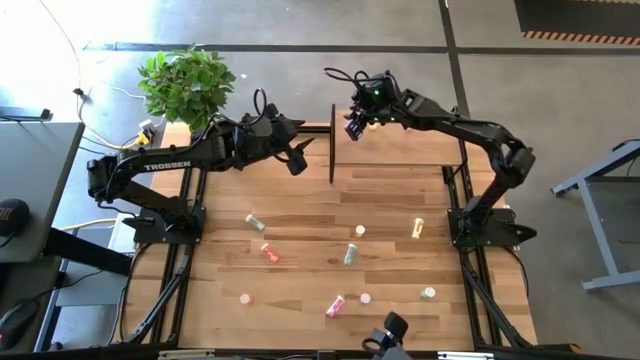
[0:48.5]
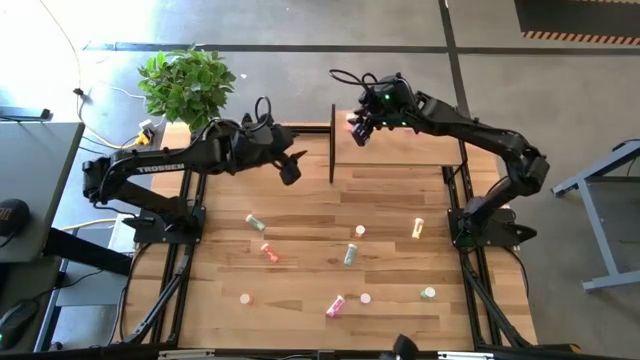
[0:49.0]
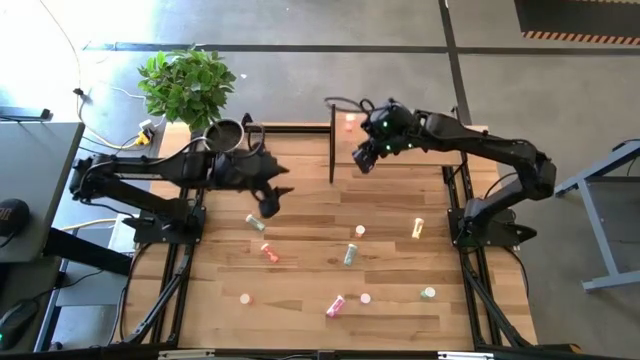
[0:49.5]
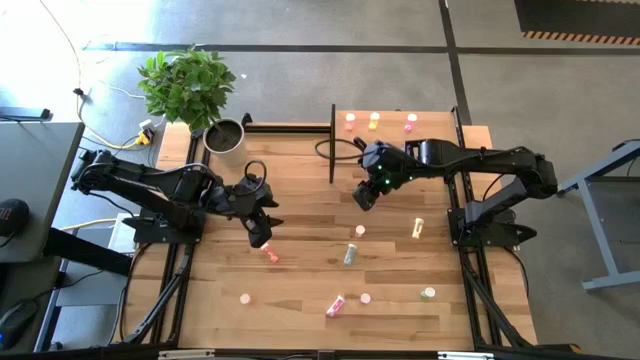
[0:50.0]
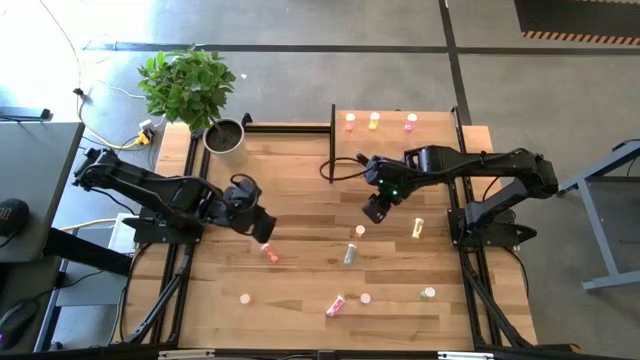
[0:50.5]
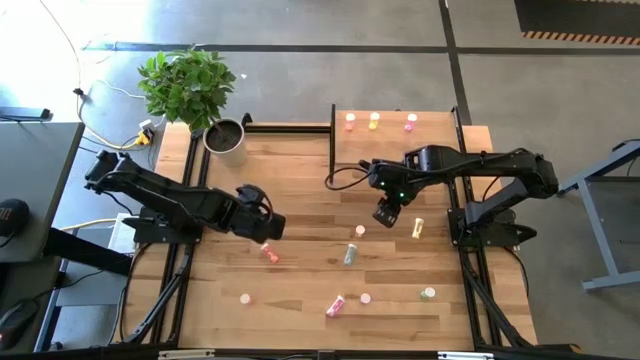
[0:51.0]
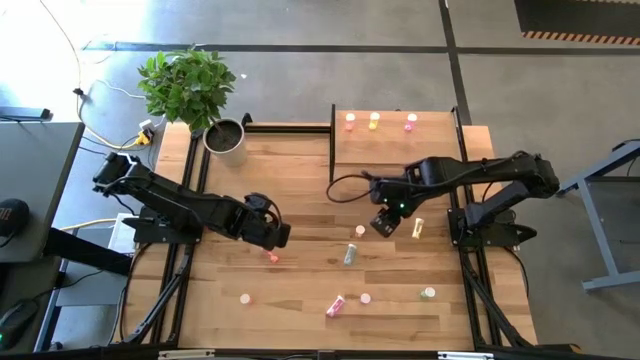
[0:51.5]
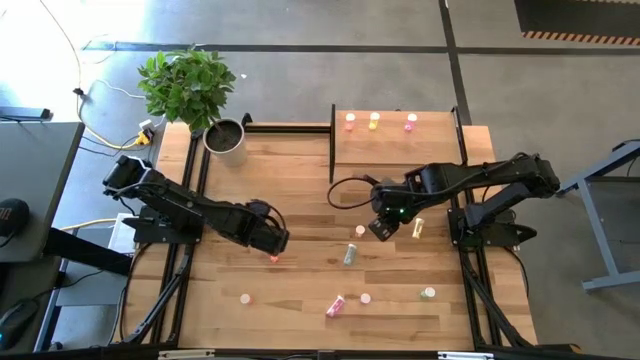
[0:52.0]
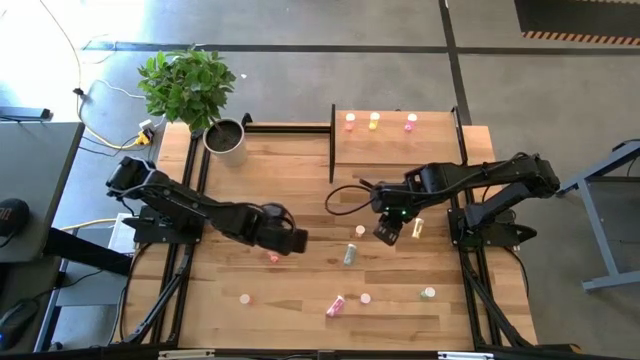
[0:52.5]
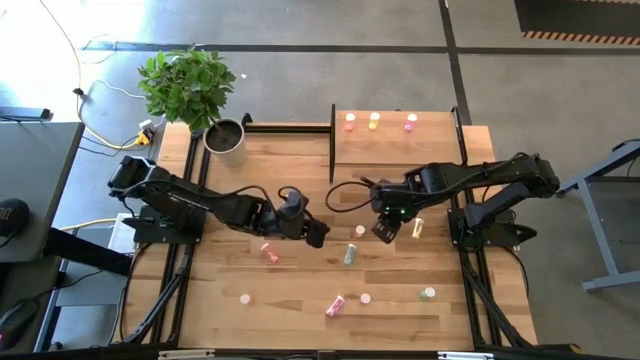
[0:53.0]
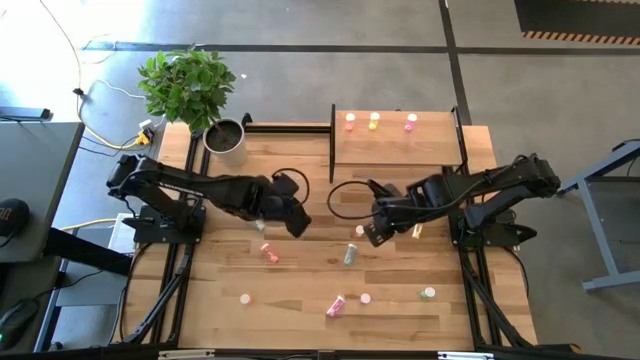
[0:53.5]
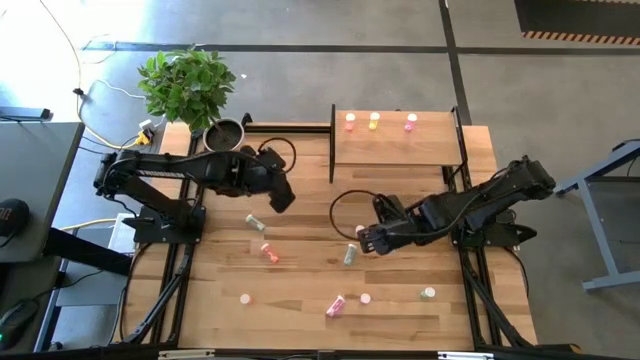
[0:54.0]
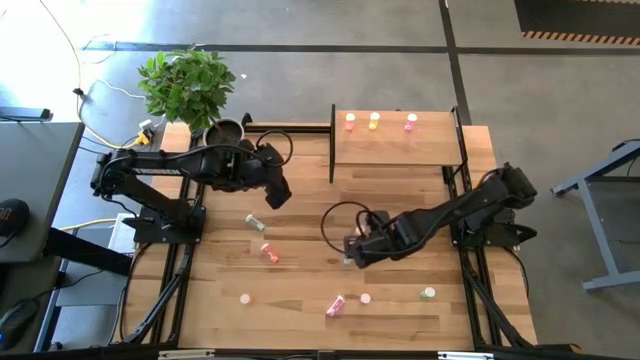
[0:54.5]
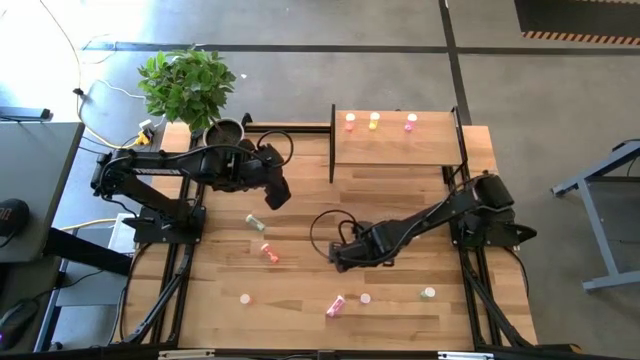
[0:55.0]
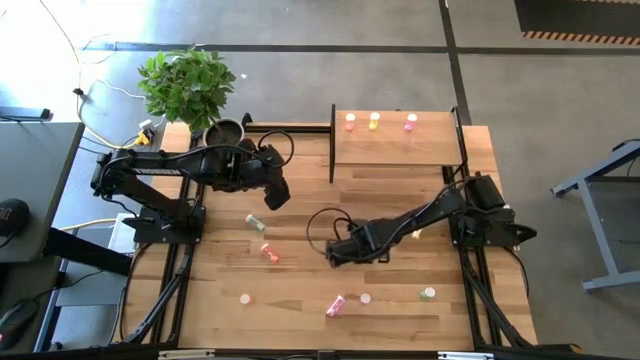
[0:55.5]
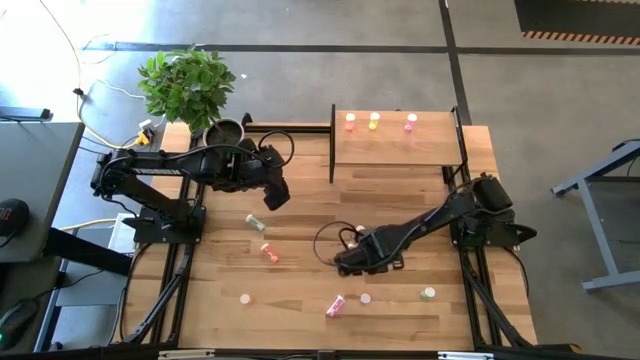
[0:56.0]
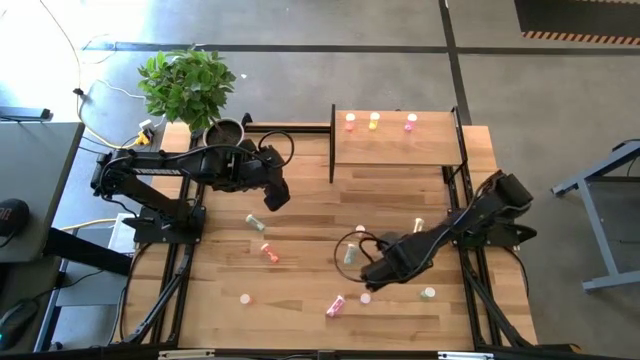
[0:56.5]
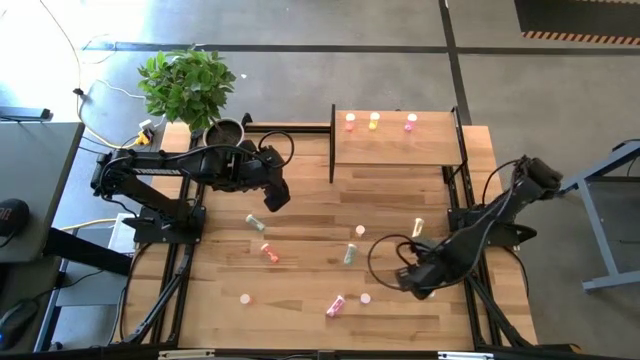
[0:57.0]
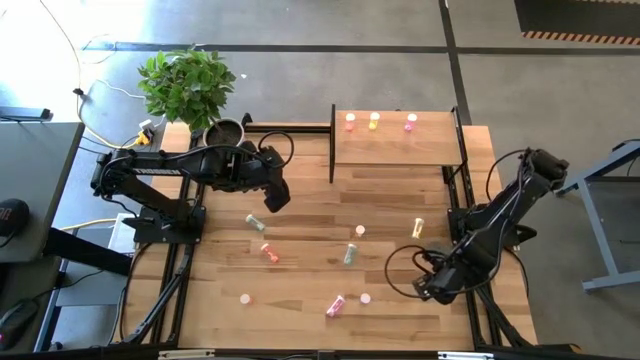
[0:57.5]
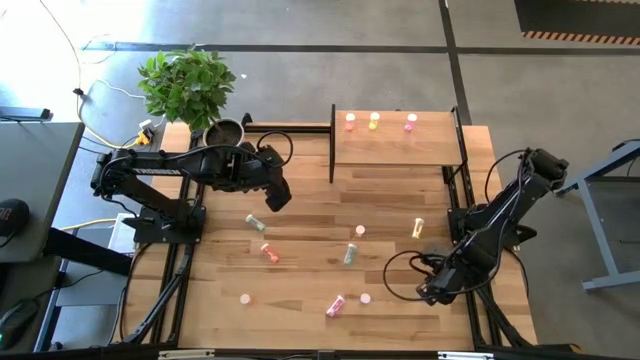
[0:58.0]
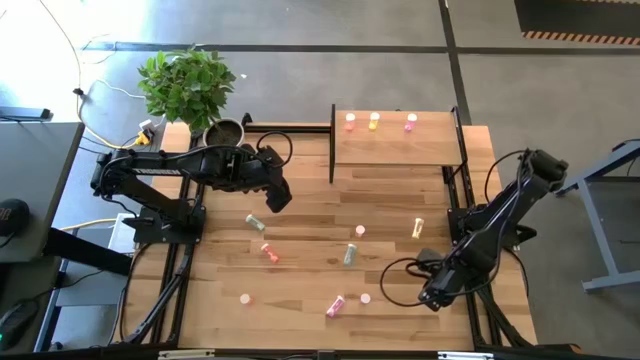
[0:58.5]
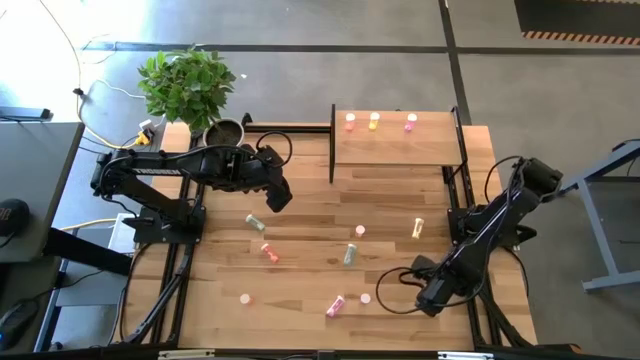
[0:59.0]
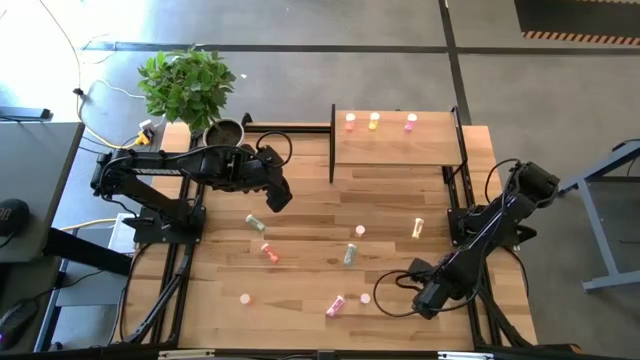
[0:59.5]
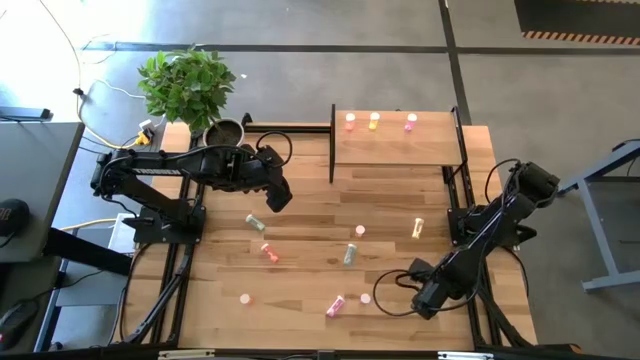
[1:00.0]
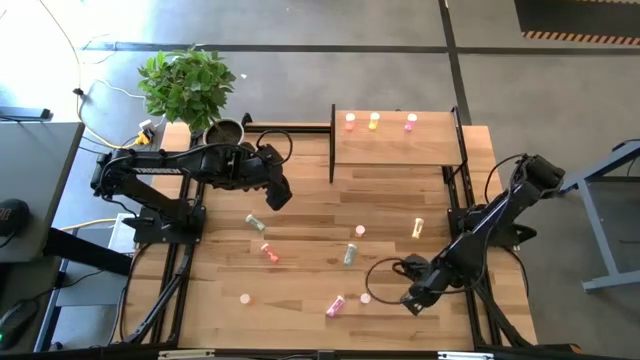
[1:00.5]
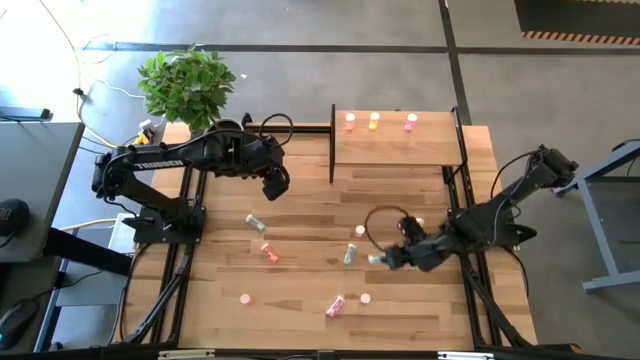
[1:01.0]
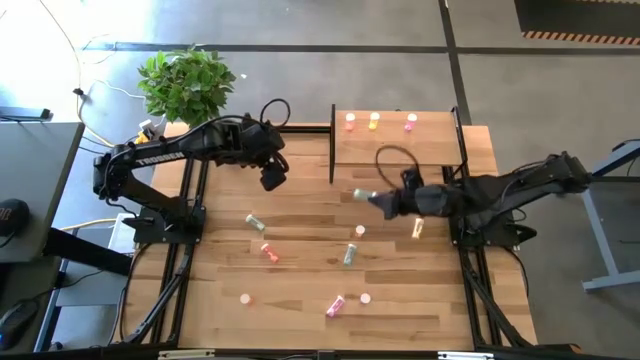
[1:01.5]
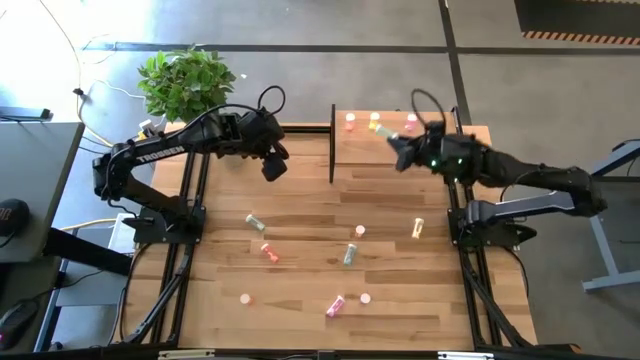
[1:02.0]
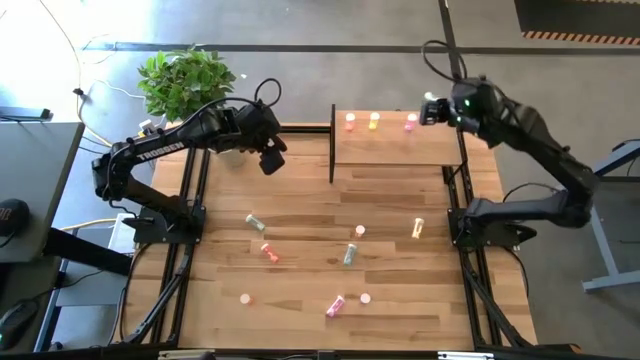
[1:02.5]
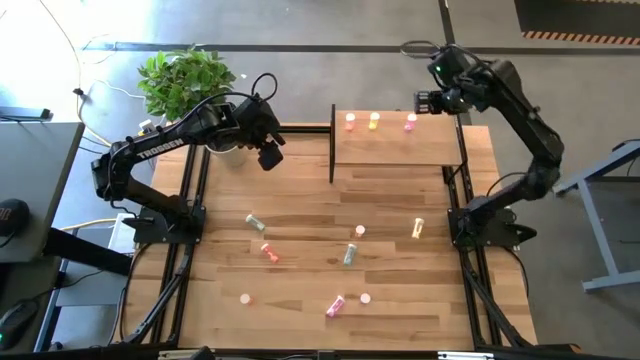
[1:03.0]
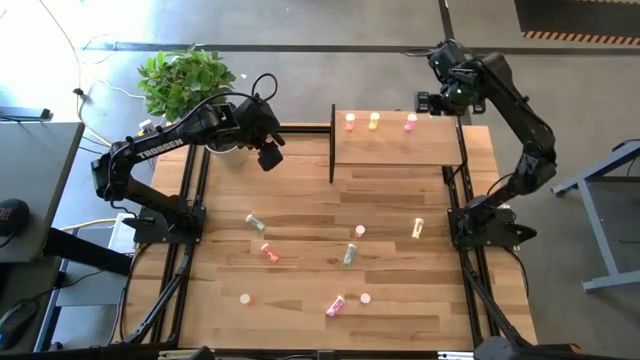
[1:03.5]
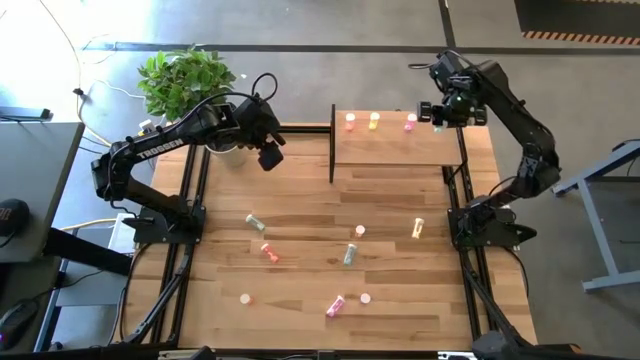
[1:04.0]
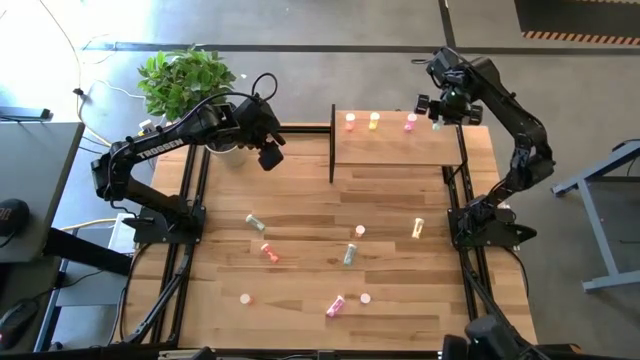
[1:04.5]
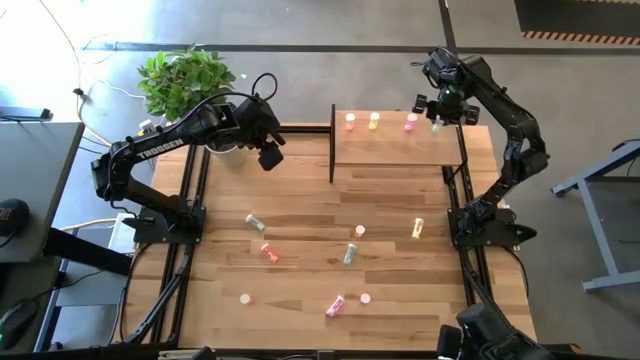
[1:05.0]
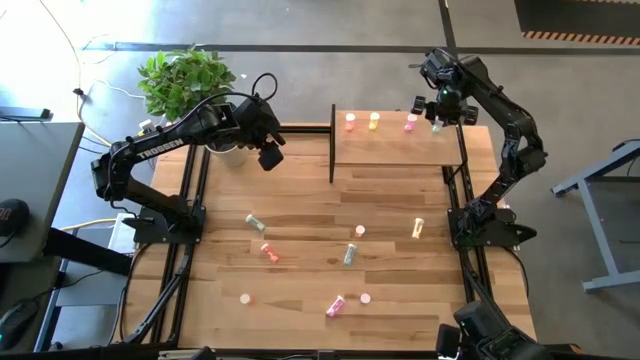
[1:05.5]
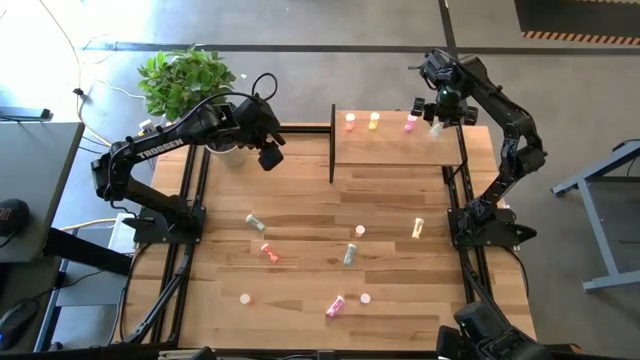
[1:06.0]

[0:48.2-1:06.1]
Task: Pick and place medicine bottles onto shelf by color
Put the bottom blue medicine bottle on the shelf

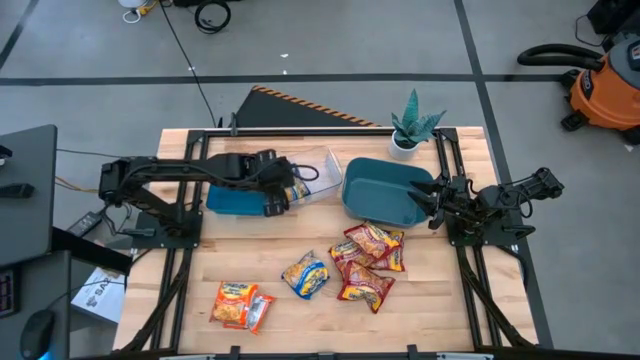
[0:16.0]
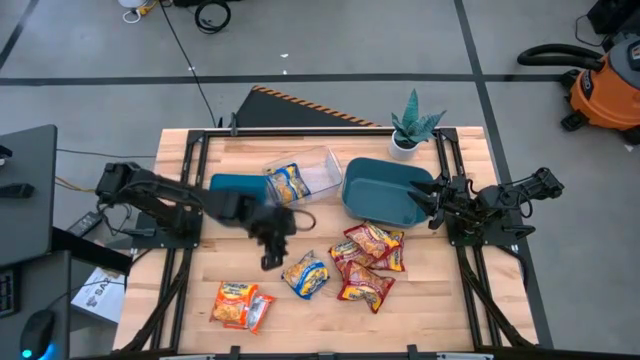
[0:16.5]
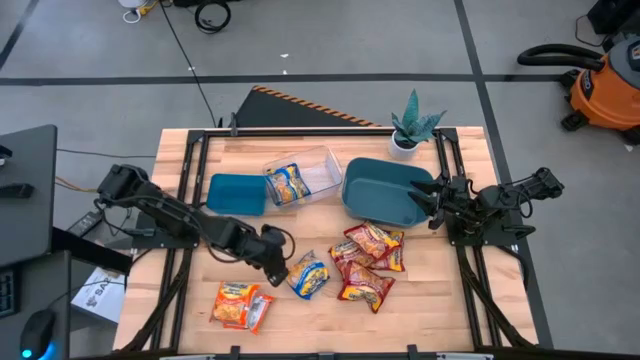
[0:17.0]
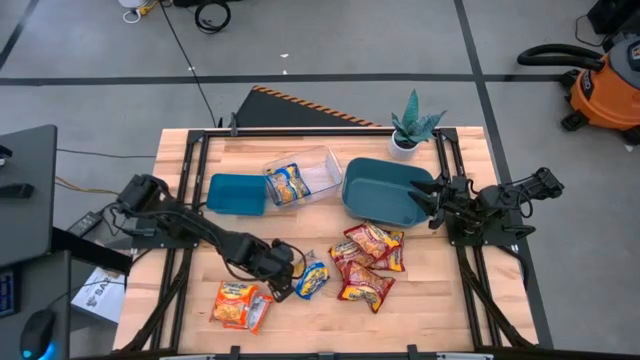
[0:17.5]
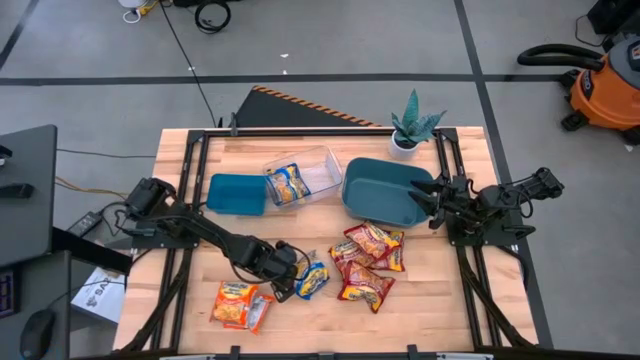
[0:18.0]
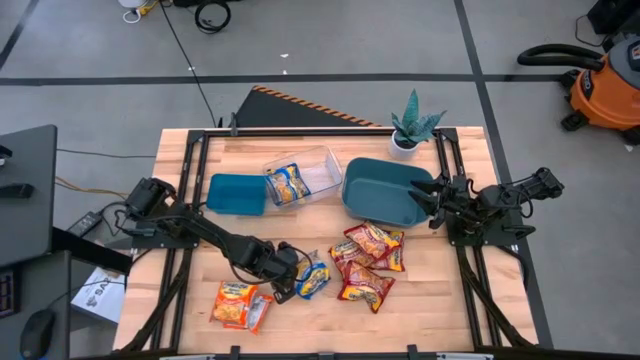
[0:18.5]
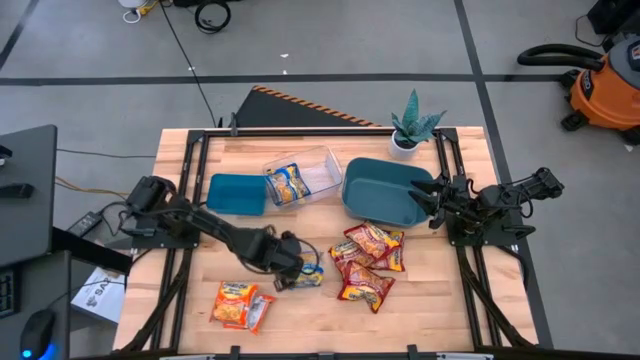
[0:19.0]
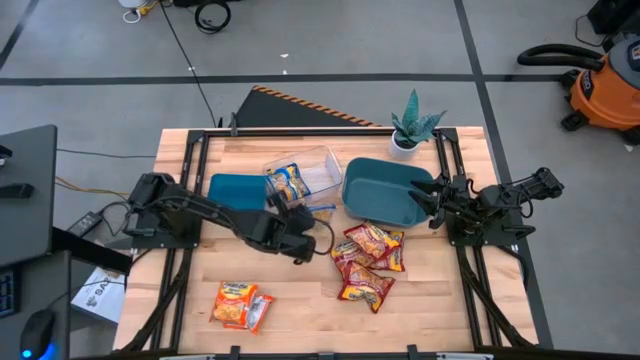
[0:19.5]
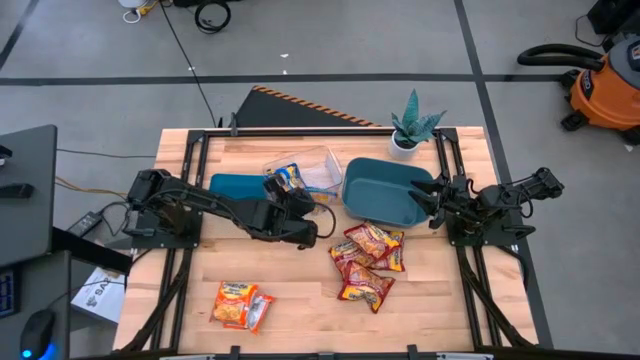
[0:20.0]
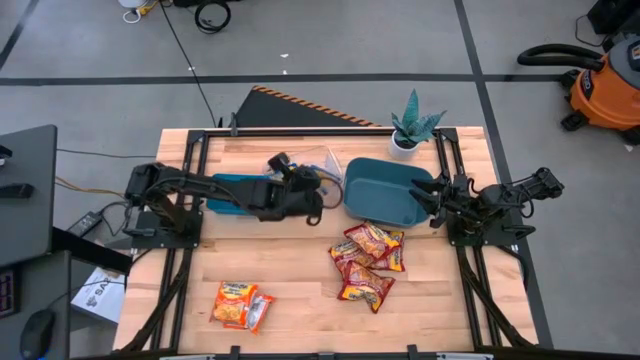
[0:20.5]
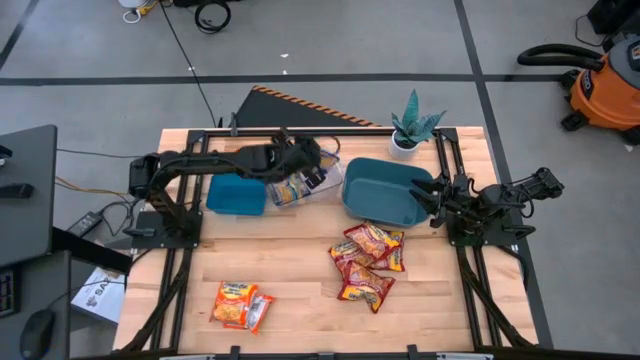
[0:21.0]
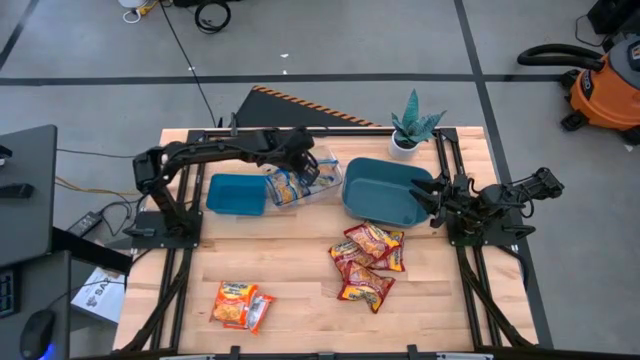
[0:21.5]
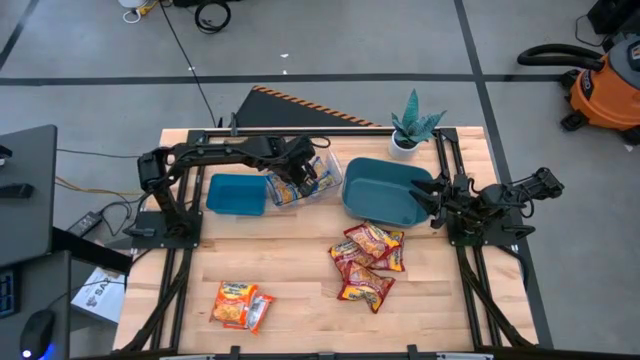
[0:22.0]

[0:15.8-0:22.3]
Task: Sort Maruchan noodles
Put the blue noodle pack into the transparent bin
